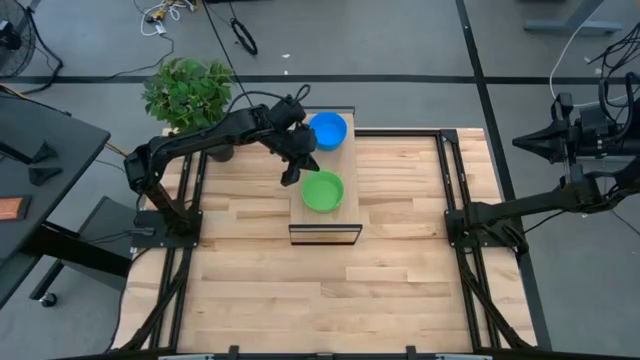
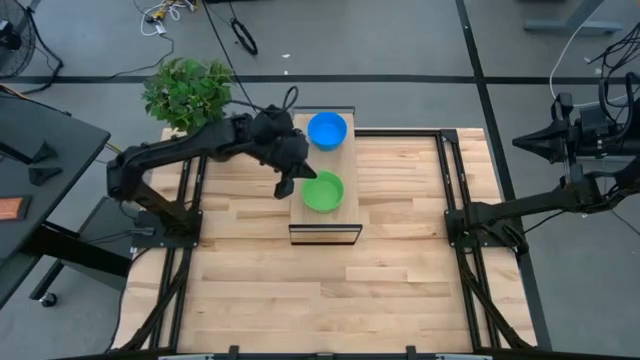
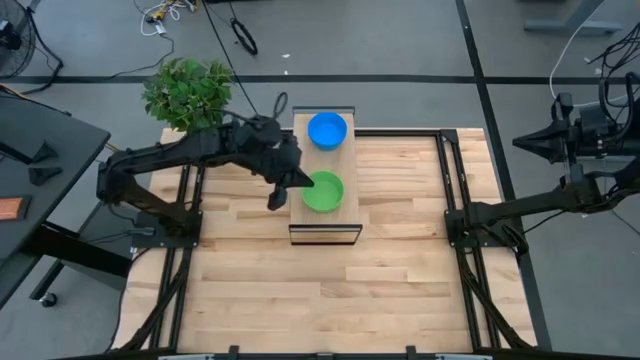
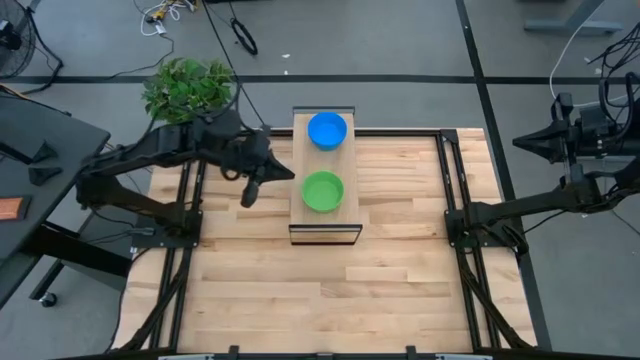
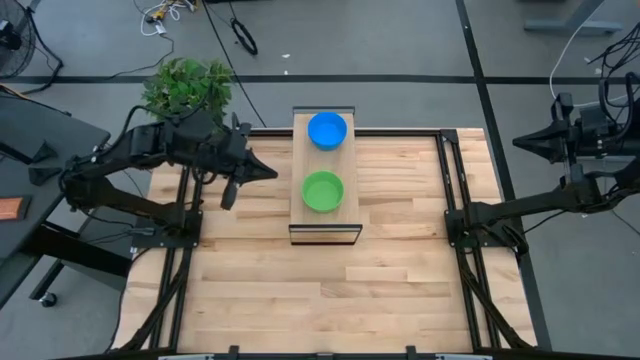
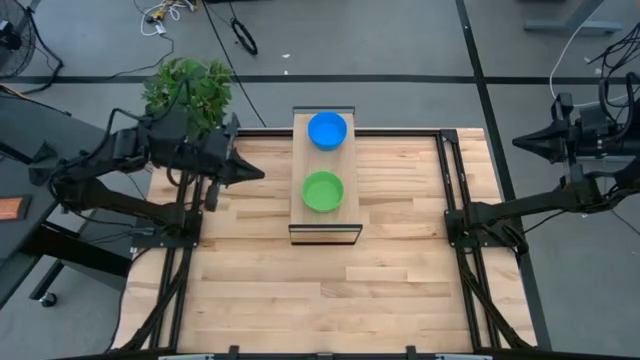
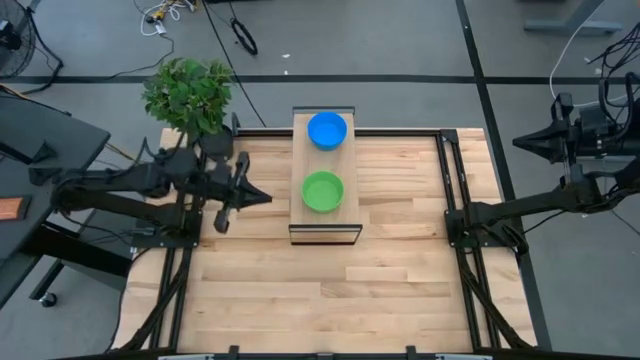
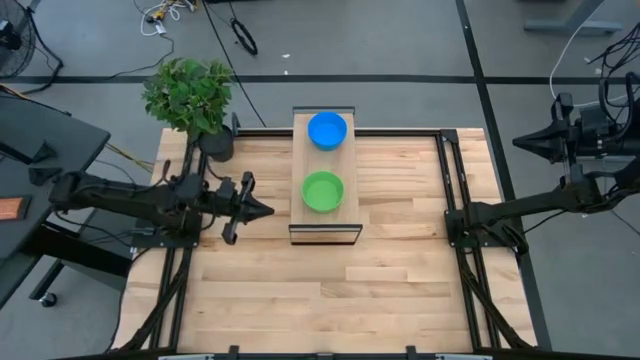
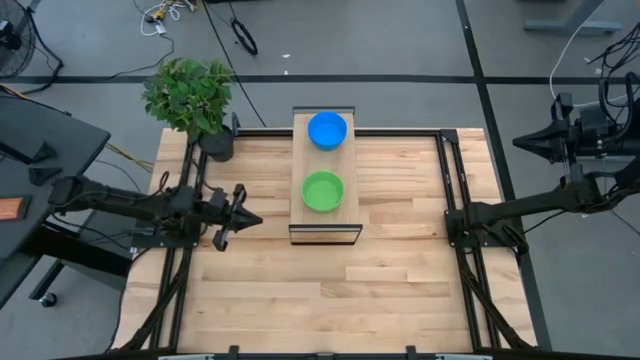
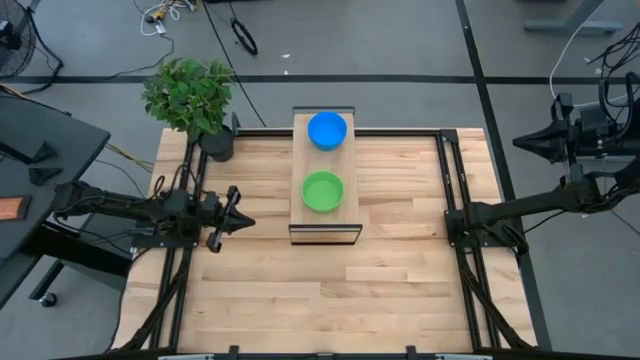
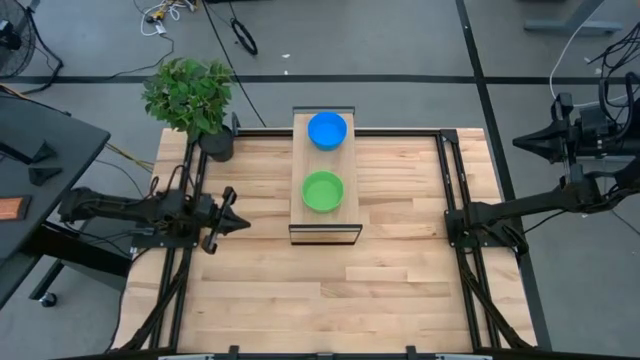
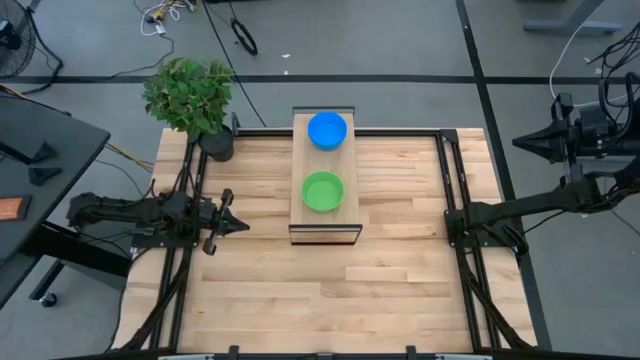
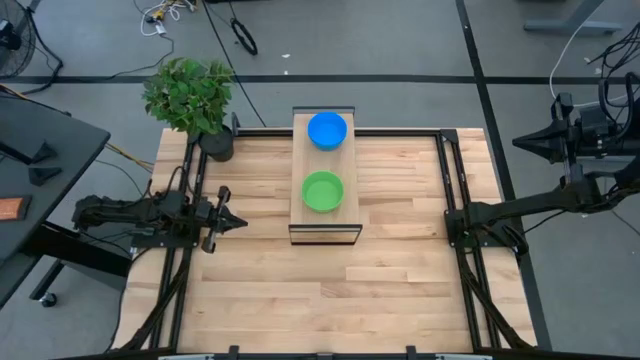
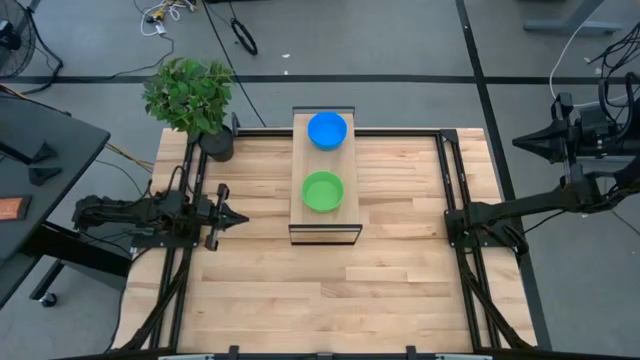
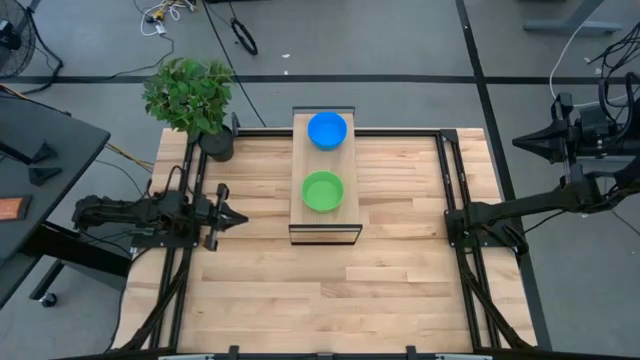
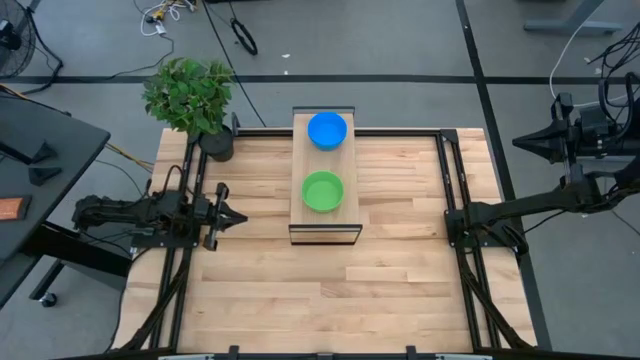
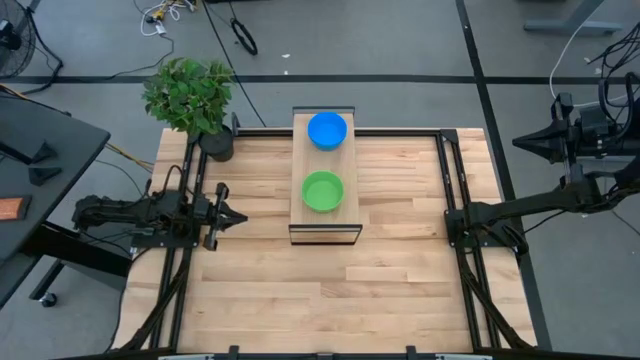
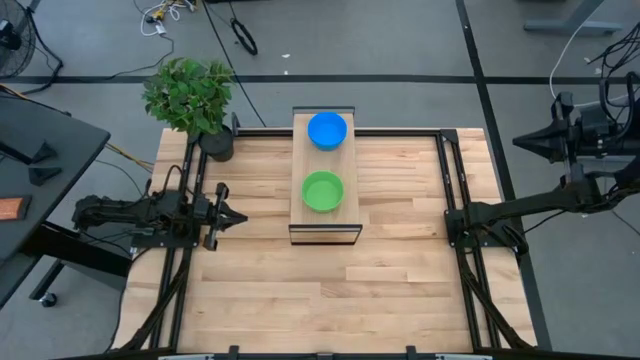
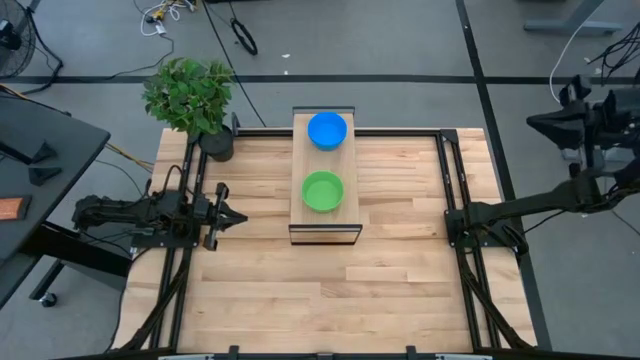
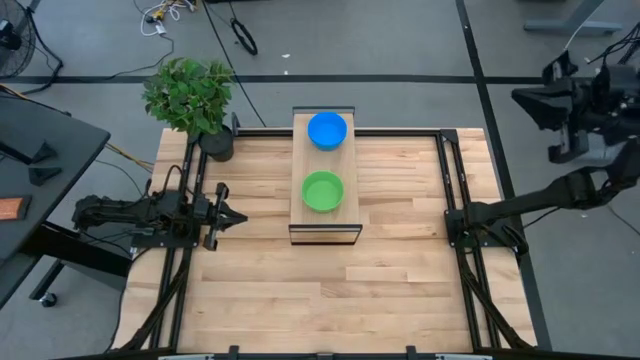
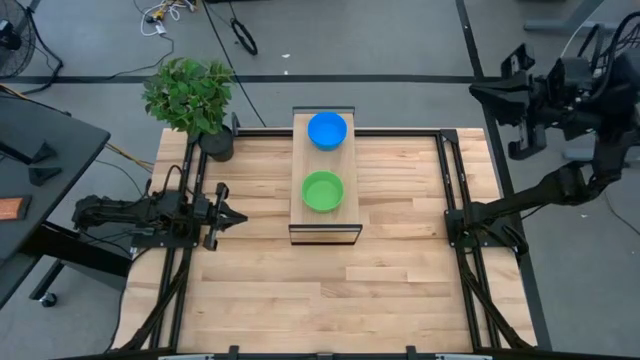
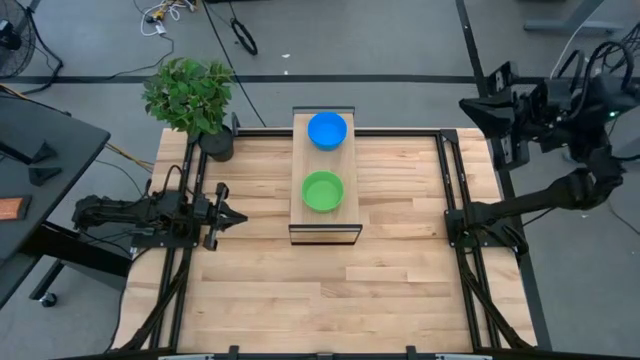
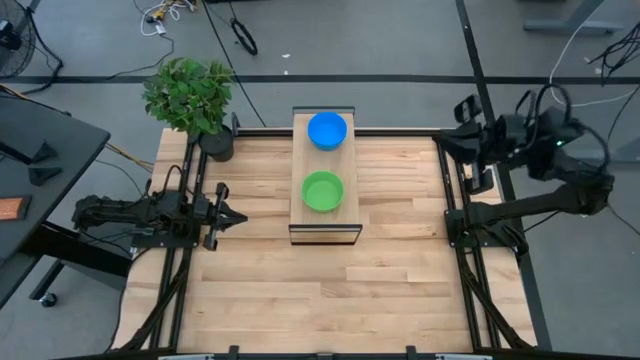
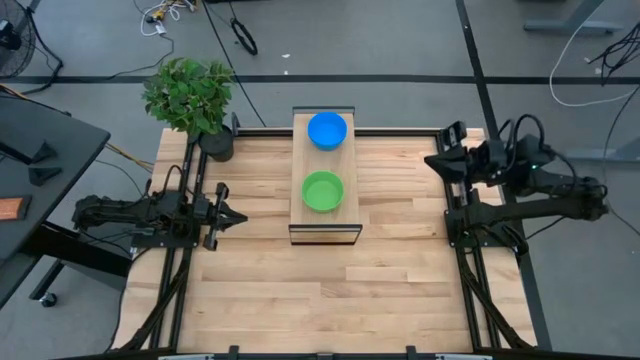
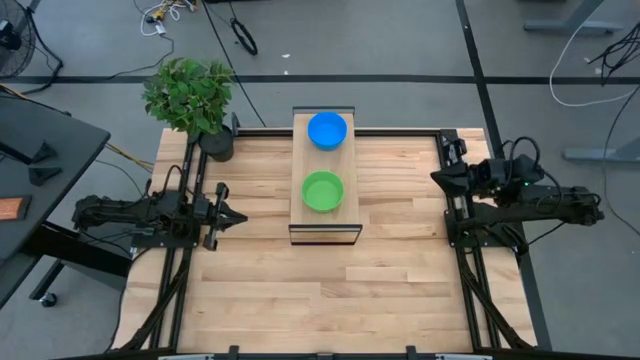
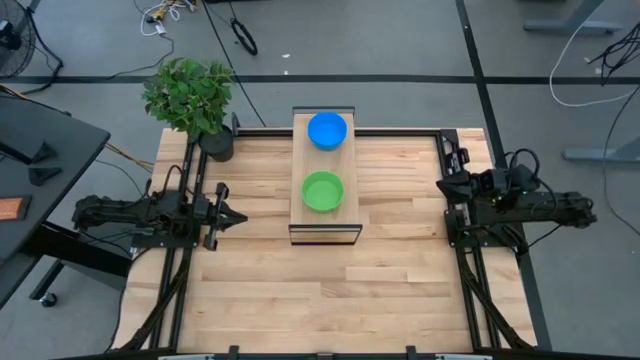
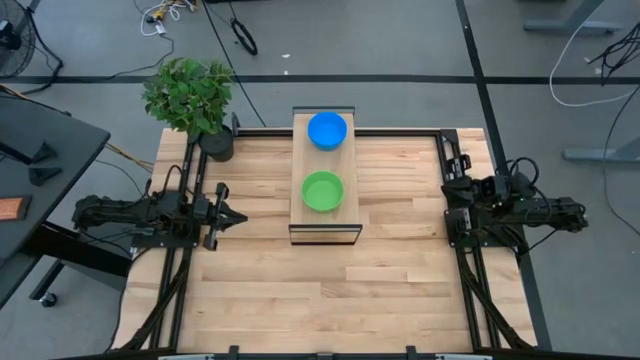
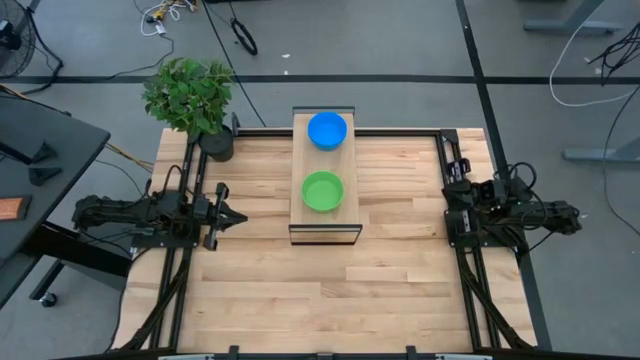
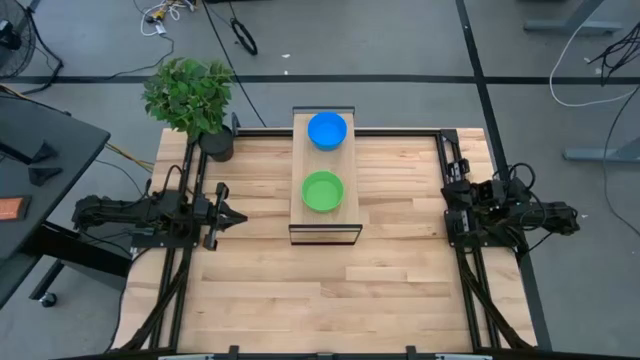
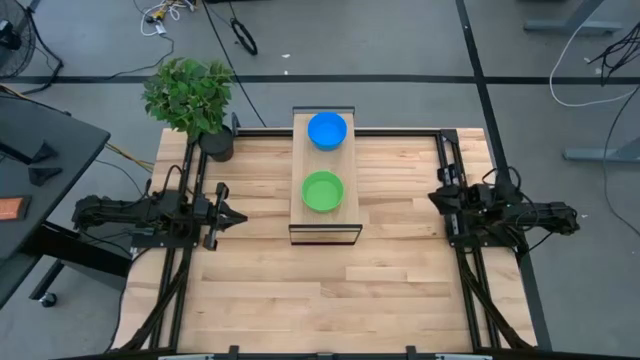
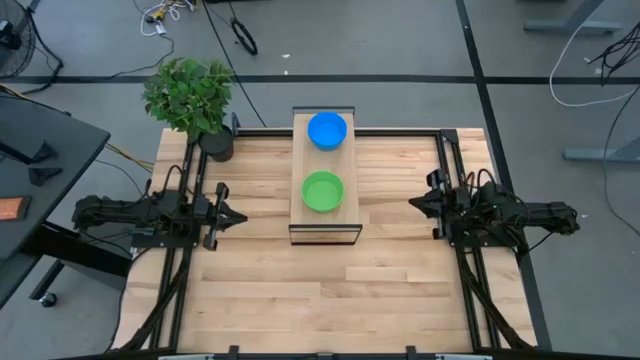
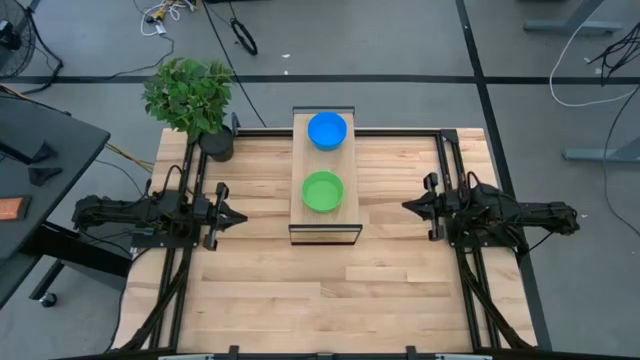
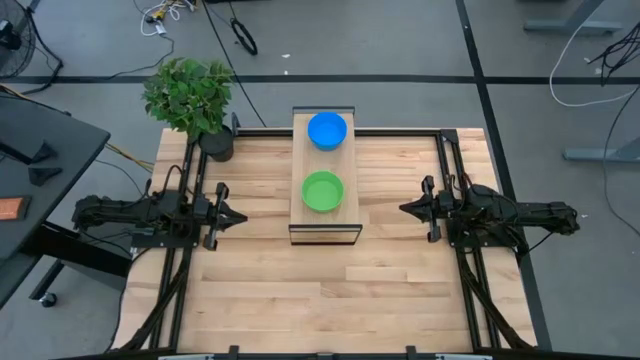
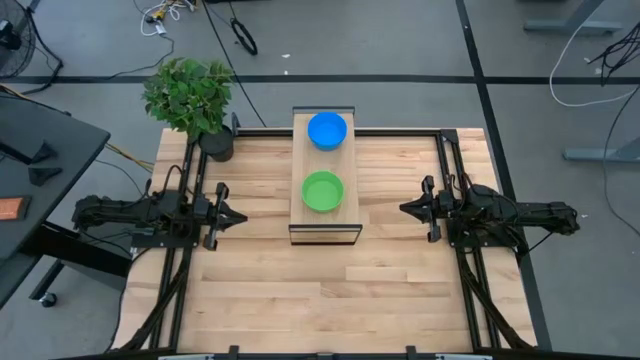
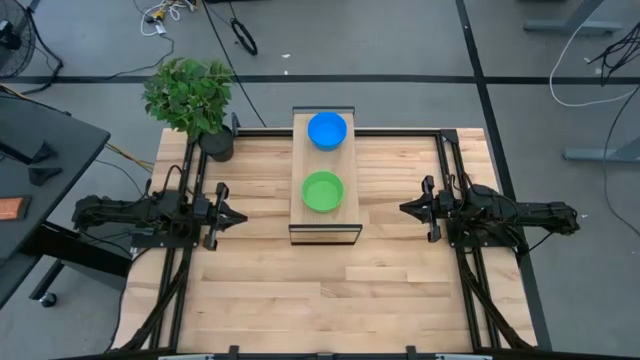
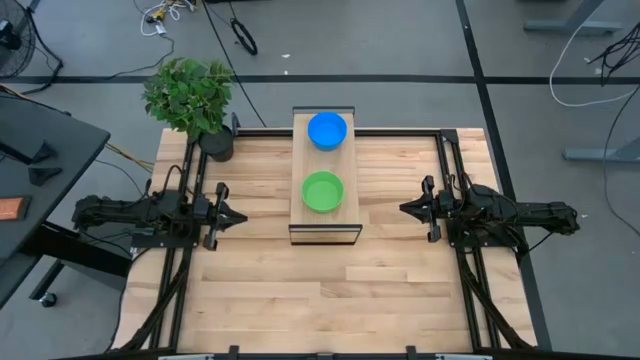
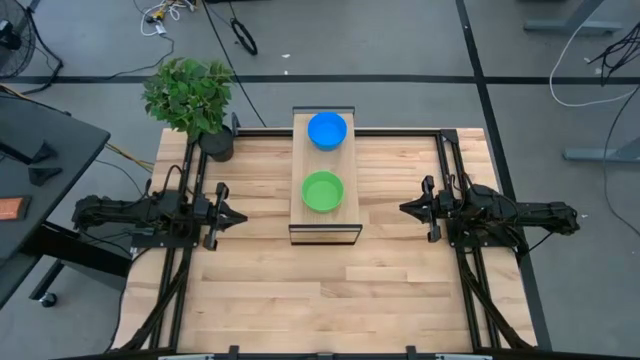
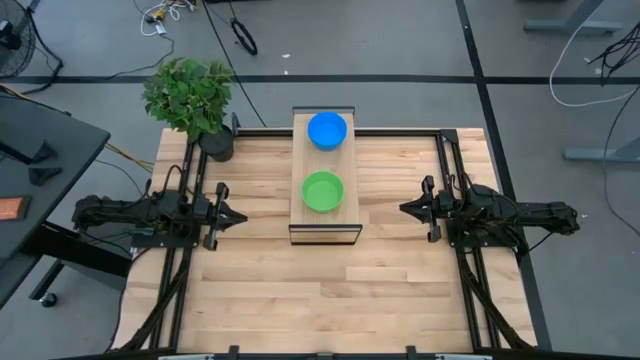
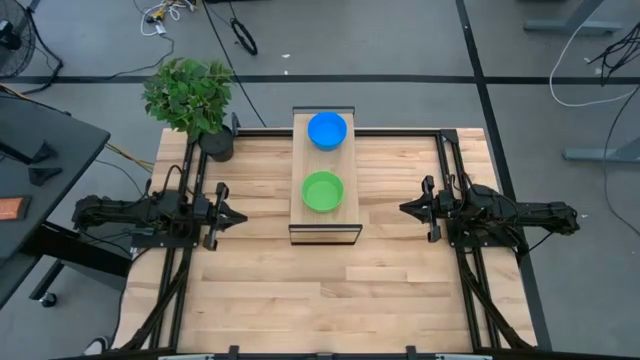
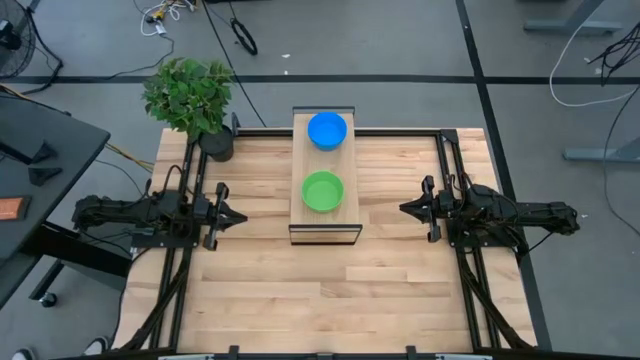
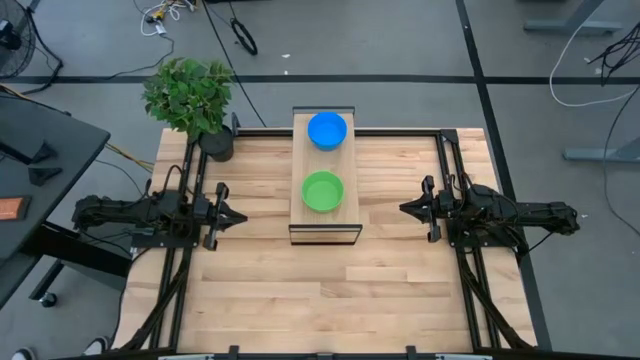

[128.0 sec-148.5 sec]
Task: Pick & Place Mini bowls
Return to Home Position
